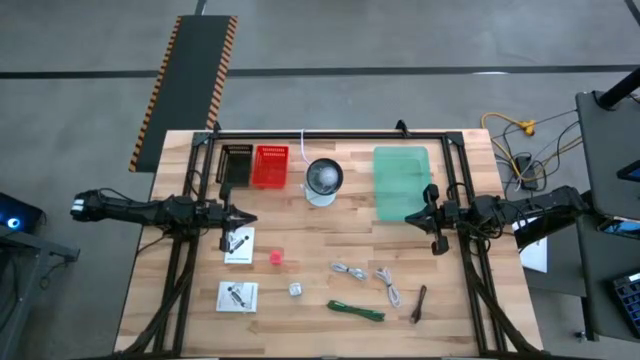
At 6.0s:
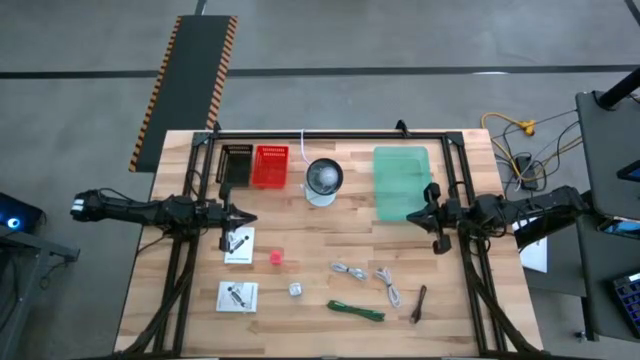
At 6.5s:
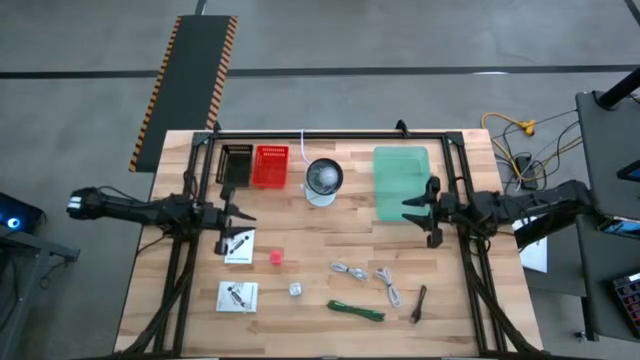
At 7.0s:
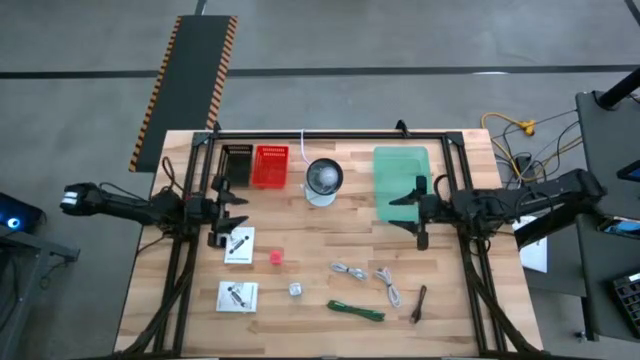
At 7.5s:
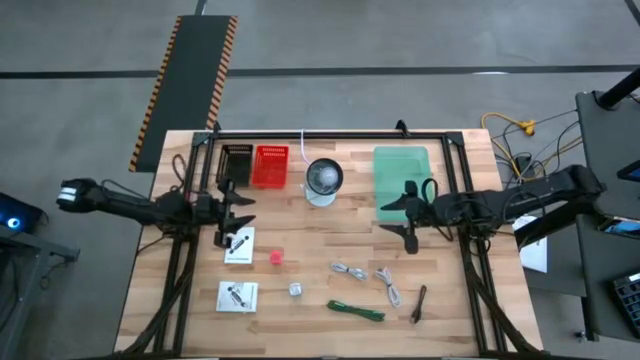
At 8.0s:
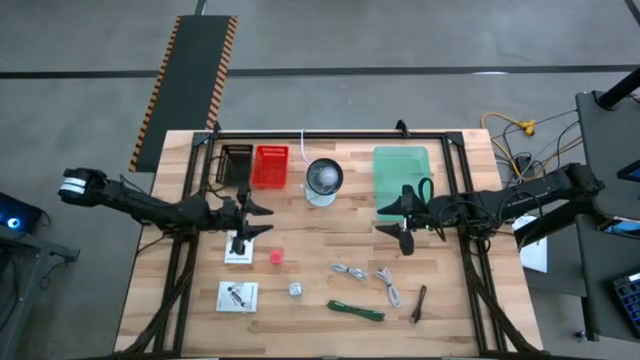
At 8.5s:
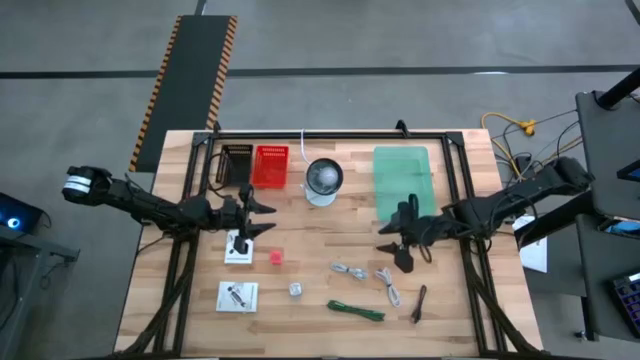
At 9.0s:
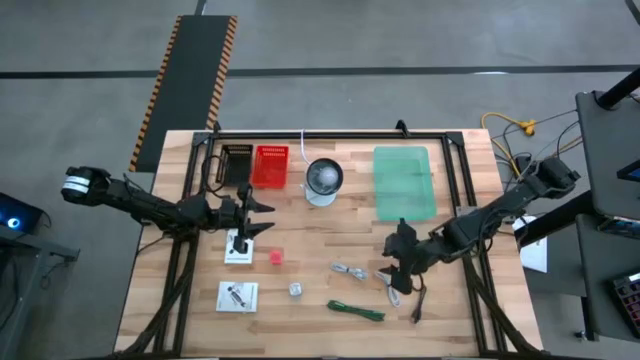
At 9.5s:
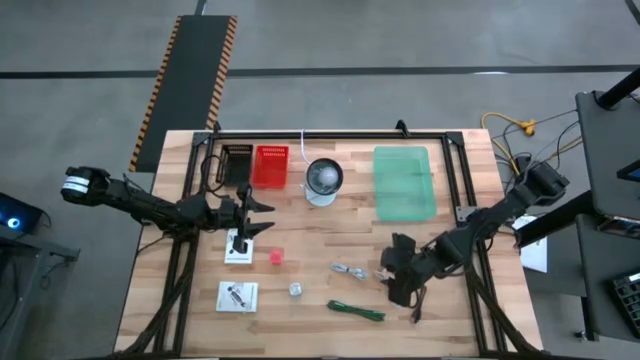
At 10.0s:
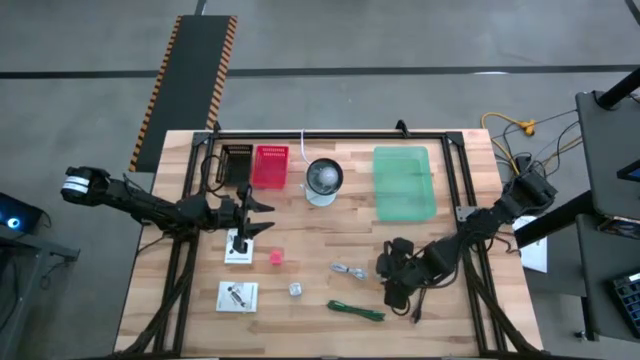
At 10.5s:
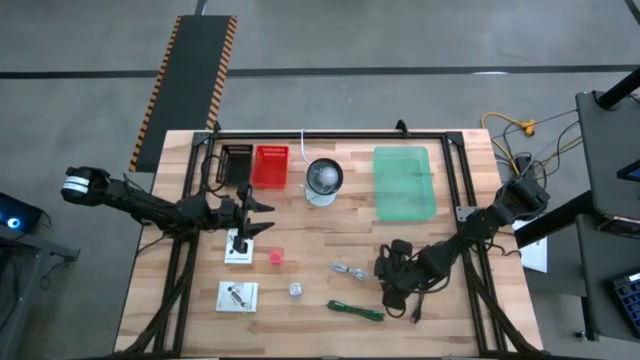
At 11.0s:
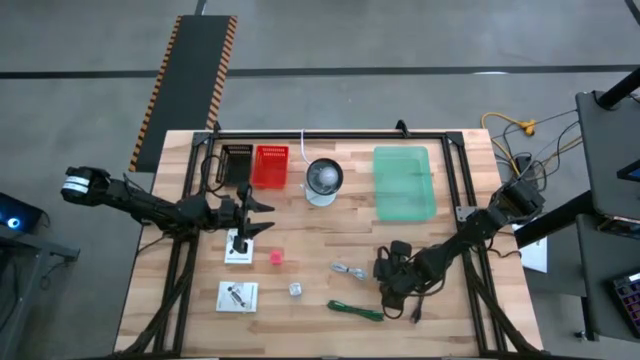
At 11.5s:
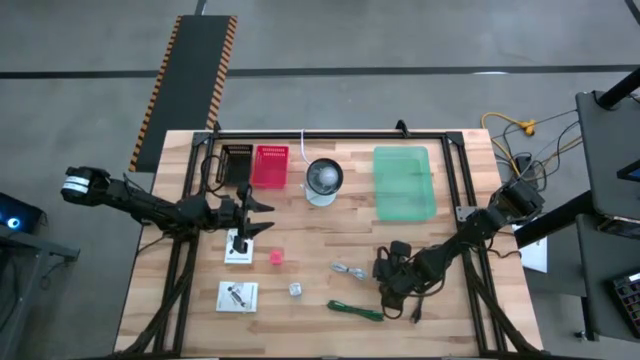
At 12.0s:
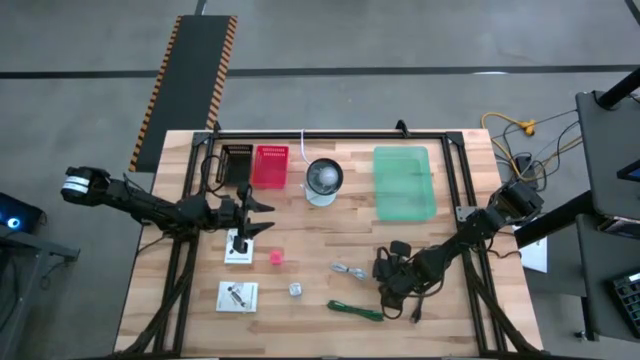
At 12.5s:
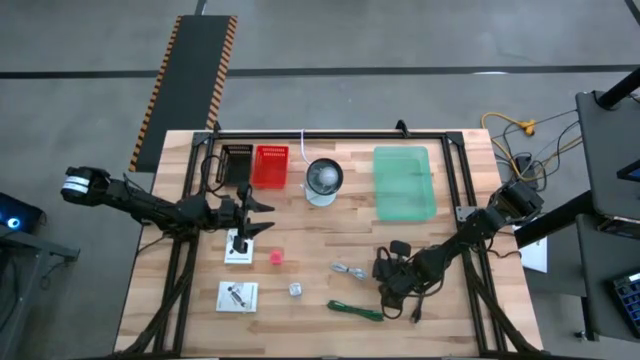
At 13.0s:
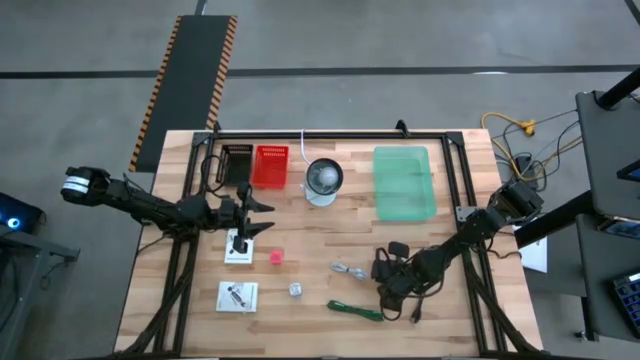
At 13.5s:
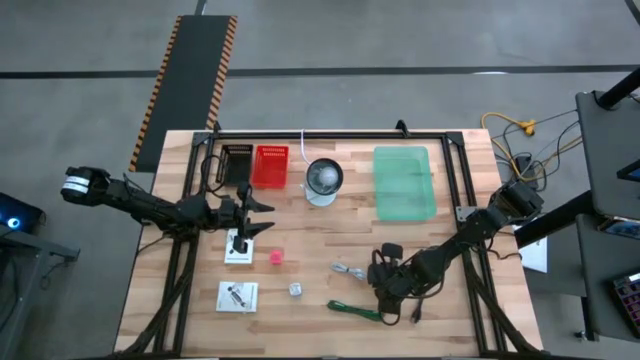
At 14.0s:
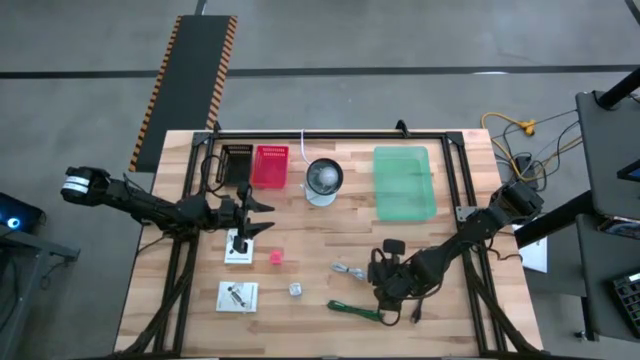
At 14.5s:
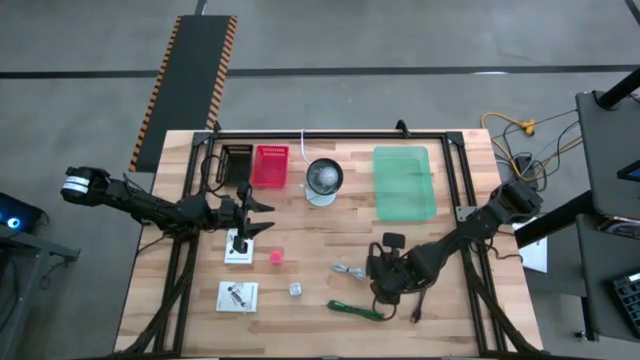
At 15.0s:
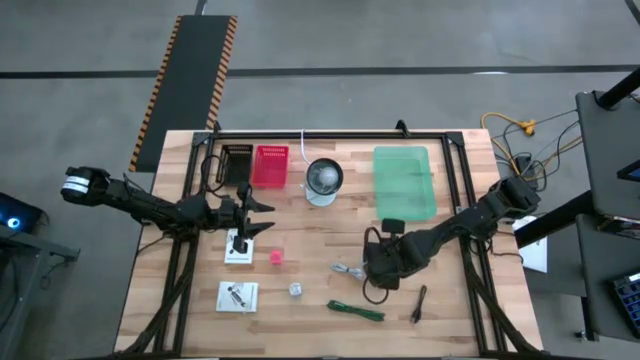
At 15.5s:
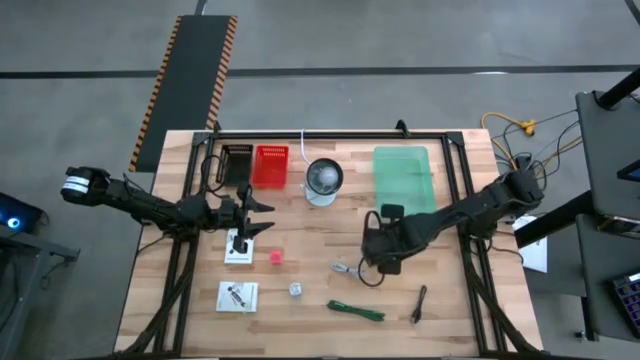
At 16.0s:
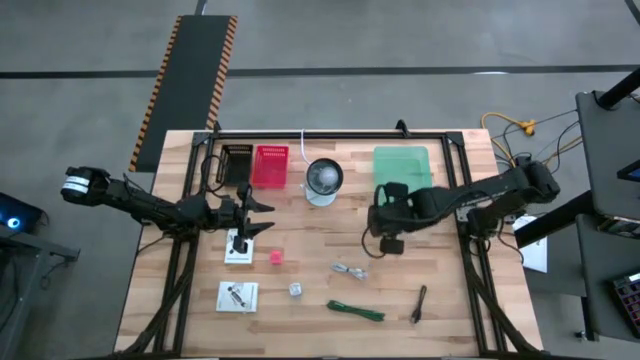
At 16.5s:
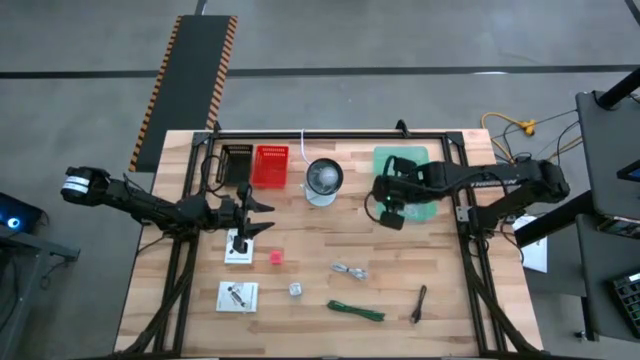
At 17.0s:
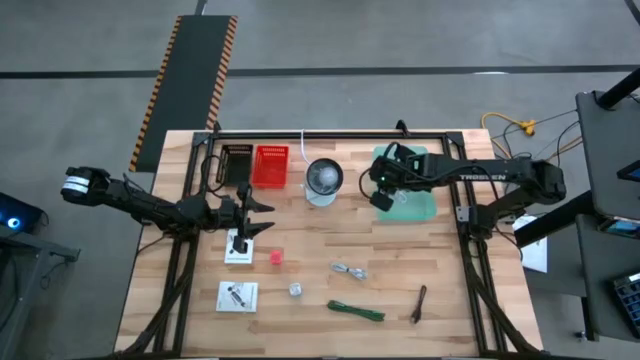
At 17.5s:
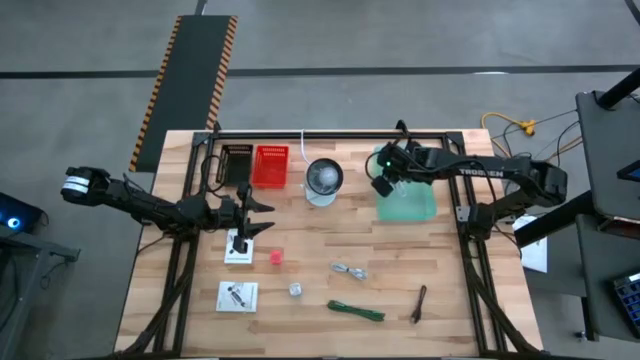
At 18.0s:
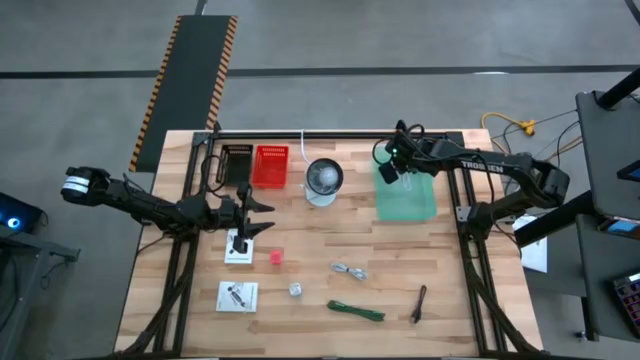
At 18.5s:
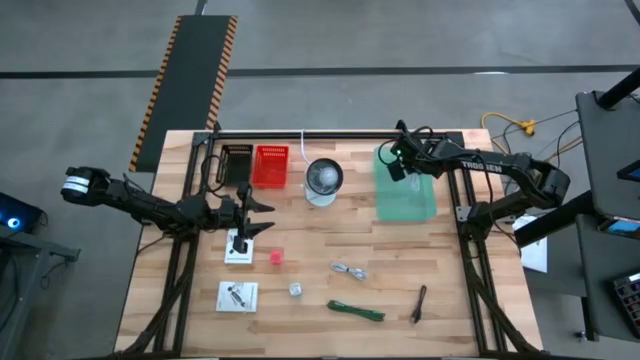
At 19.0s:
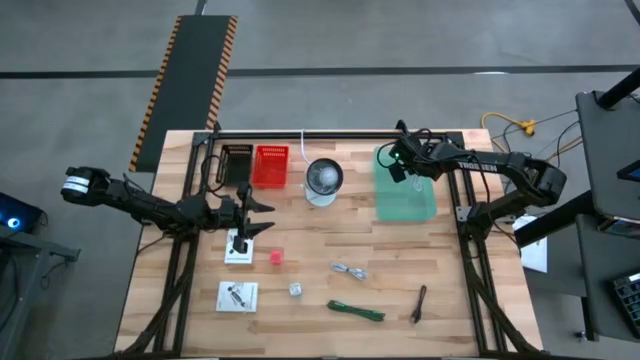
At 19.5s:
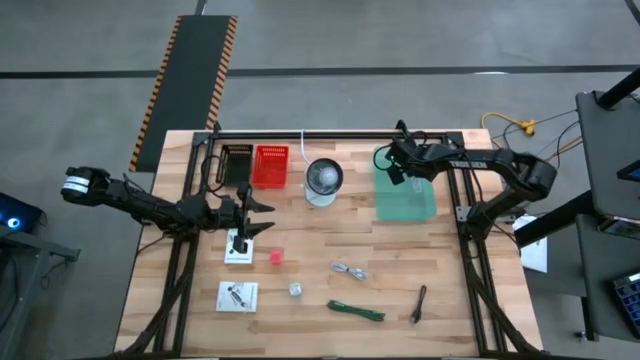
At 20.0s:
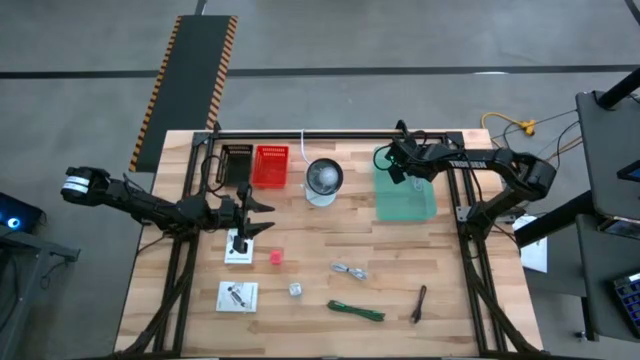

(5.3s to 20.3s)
Task: Pick and place items into bin
Put the white charger cable into the green bin
